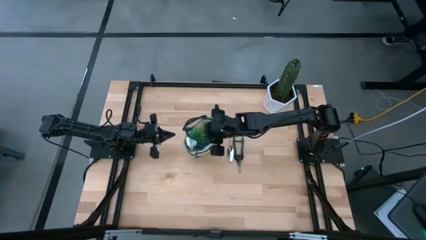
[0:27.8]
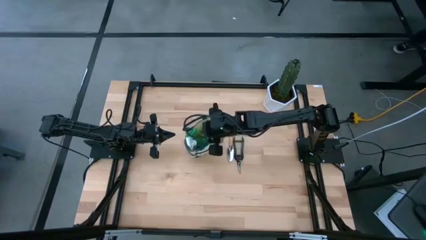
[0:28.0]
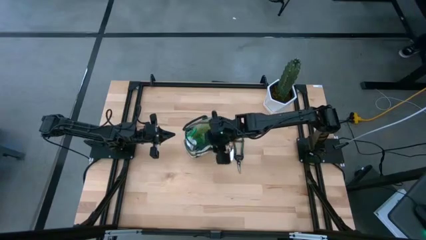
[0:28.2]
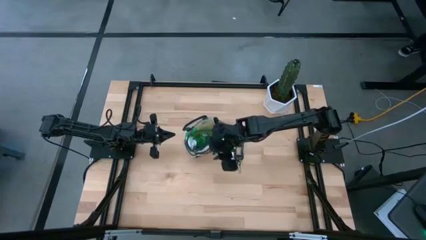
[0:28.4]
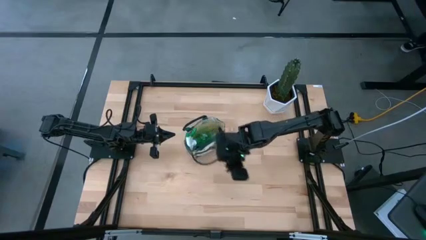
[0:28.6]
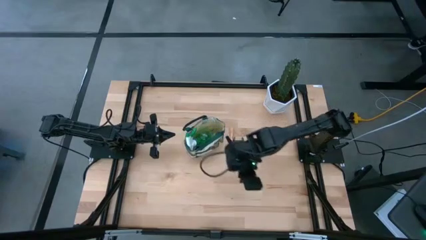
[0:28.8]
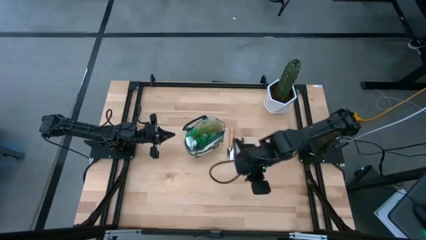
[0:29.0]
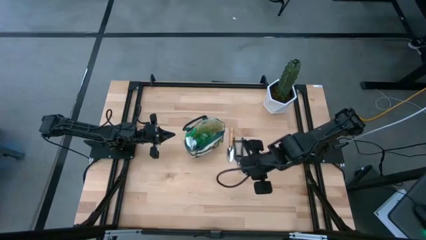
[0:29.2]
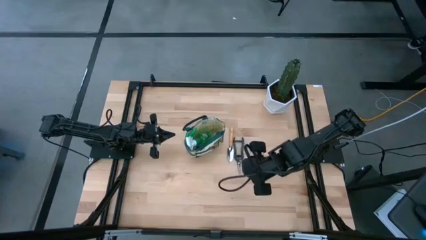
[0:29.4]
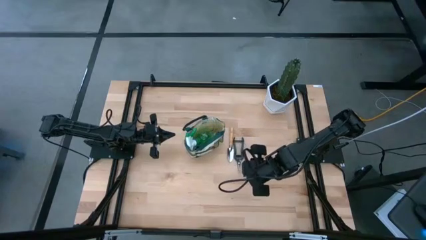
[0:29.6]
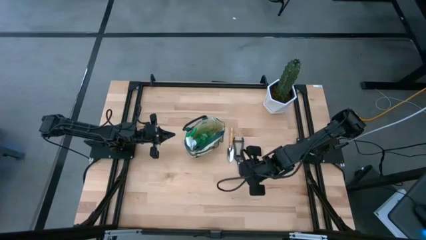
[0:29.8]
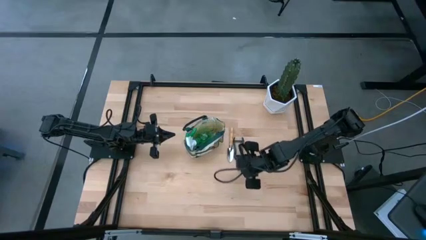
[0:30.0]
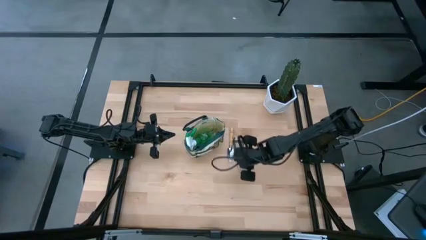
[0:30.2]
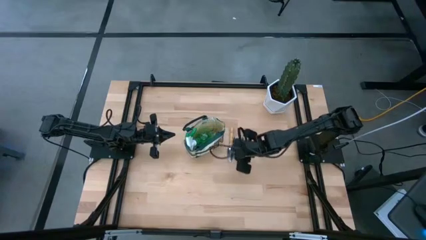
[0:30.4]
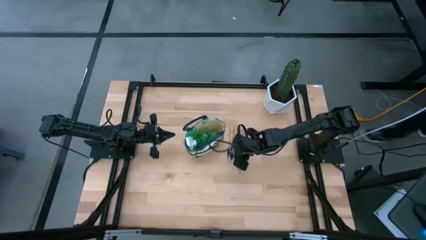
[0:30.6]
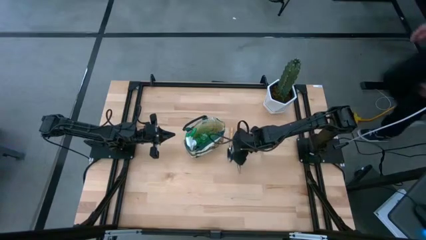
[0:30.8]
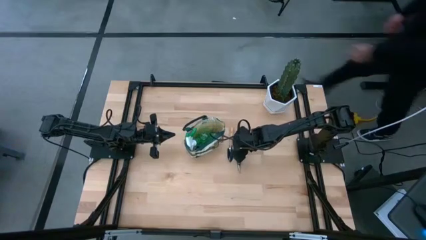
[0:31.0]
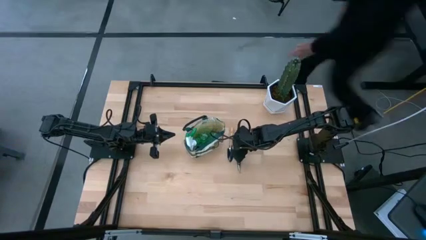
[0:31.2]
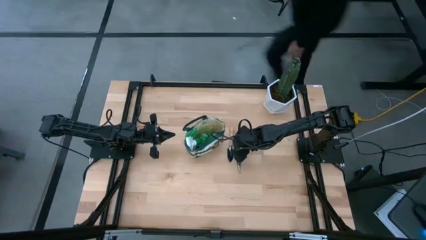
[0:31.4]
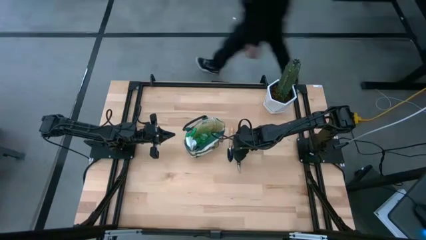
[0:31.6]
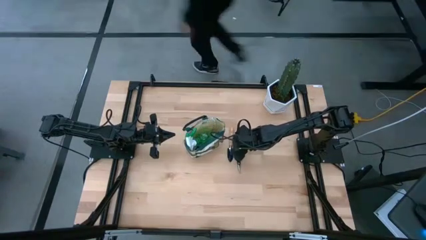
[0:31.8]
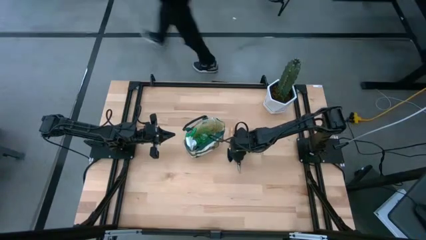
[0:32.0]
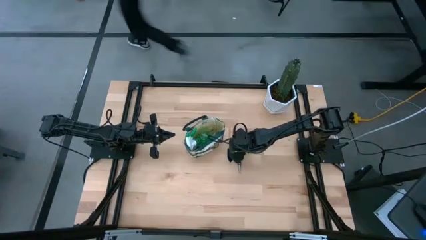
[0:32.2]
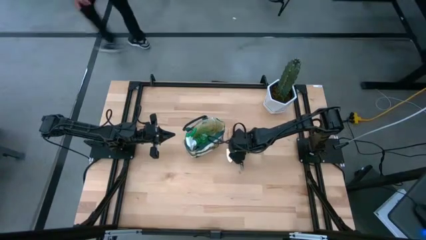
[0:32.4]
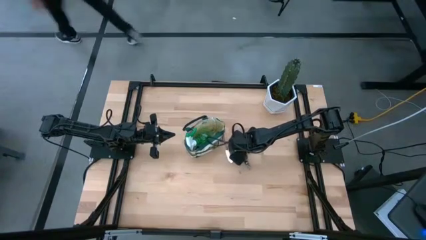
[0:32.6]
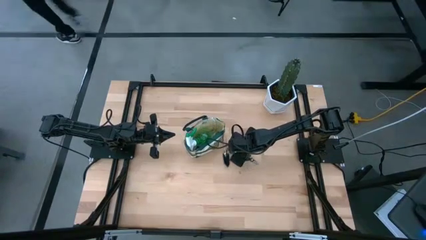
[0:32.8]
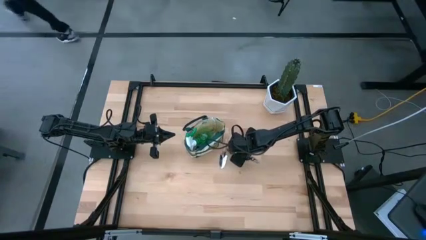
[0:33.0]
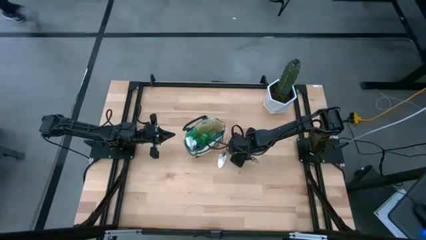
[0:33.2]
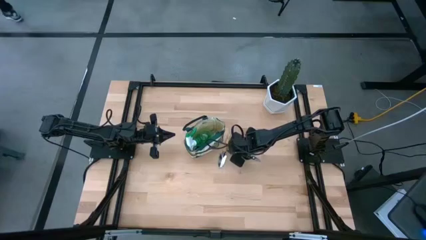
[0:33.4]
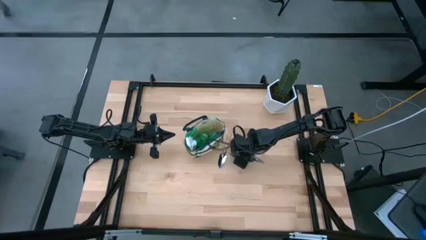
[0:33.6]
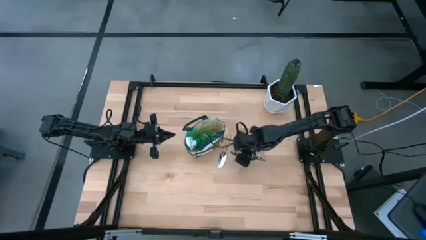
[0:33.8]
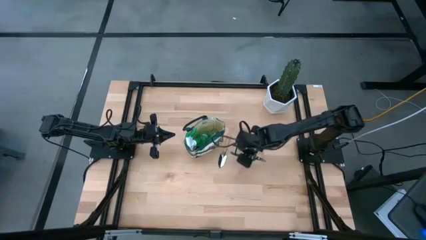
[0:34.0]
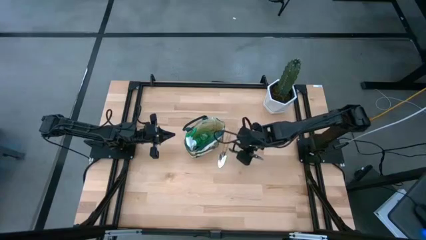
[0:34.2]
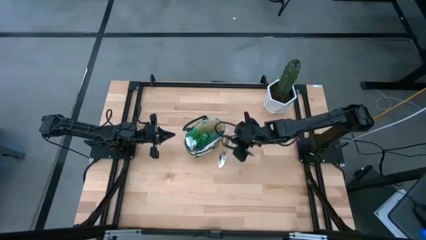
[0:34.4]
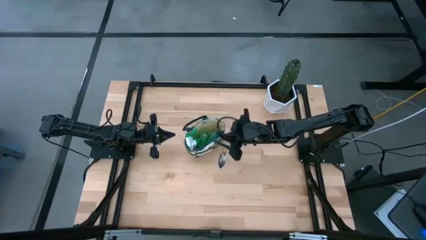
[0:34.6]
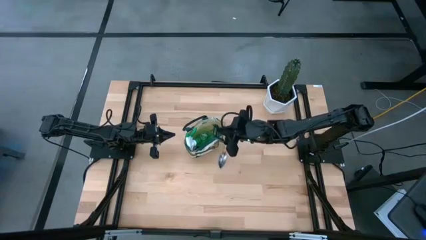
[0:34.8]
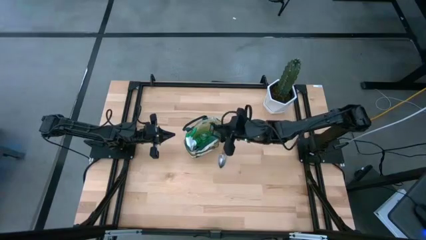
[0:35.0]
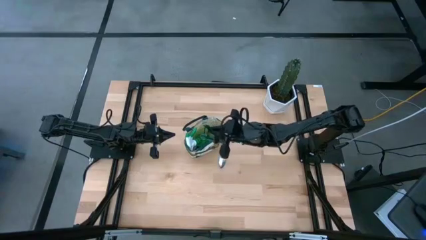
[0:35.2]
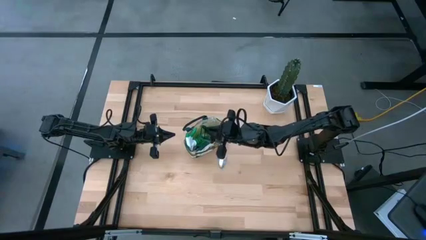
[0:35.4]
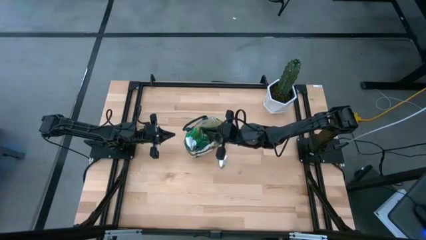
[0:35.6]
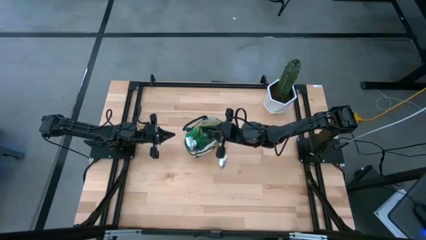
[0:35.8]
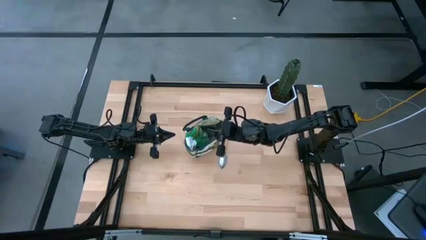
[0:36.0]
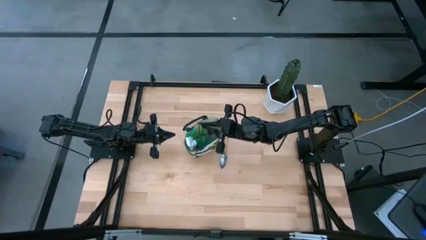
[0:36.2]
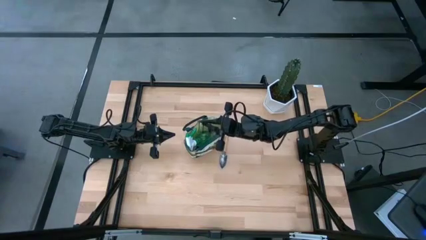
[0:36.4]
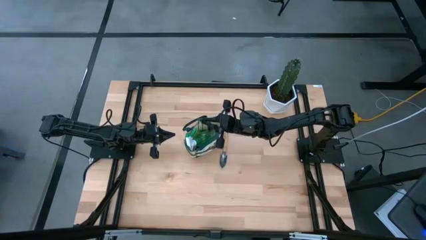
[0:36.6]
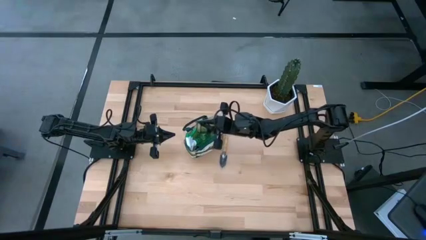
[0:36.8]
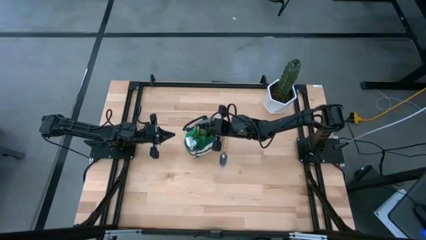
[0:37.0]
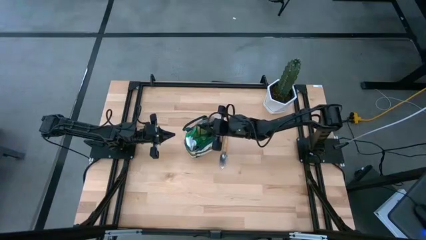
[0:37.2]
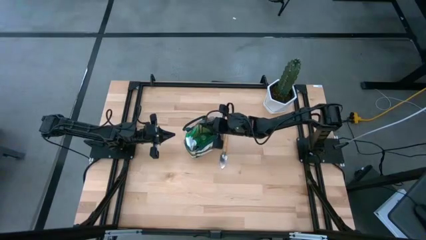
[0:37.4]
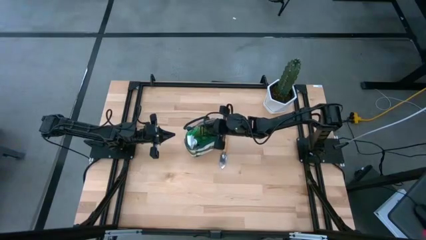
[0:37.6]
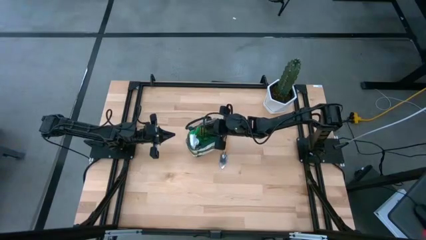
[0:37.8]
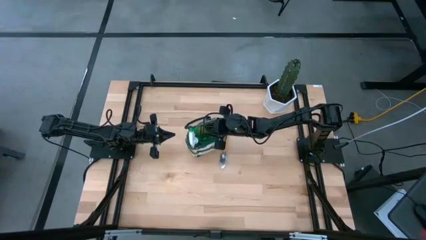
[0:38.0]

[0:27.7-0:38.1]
Task: Pick & Place Garden tools in Gardening bag
Put the shear scissors into the gardening bag
